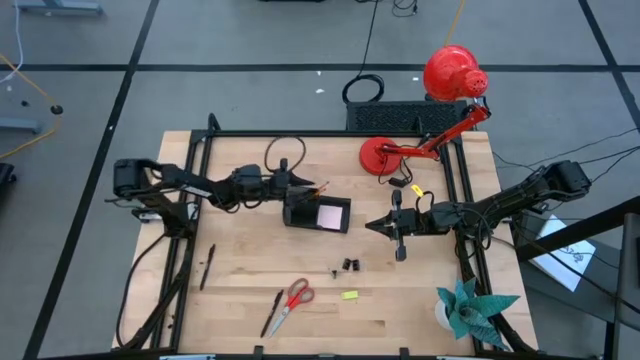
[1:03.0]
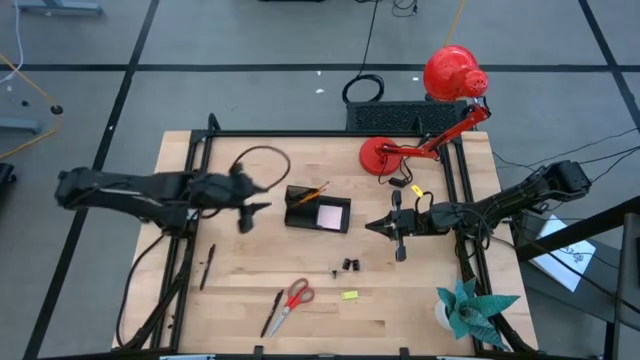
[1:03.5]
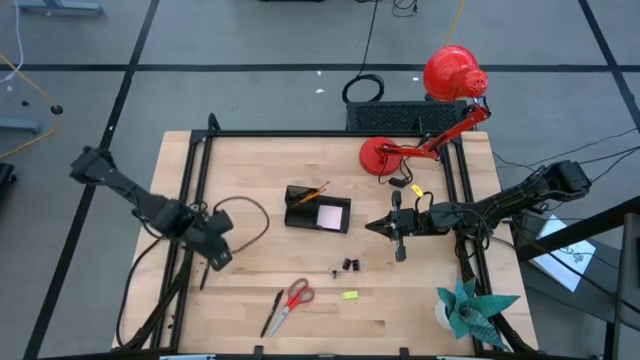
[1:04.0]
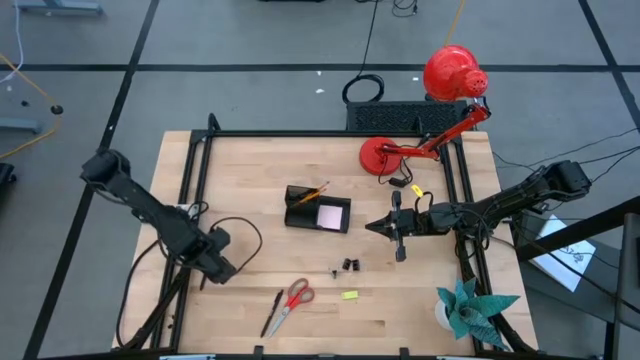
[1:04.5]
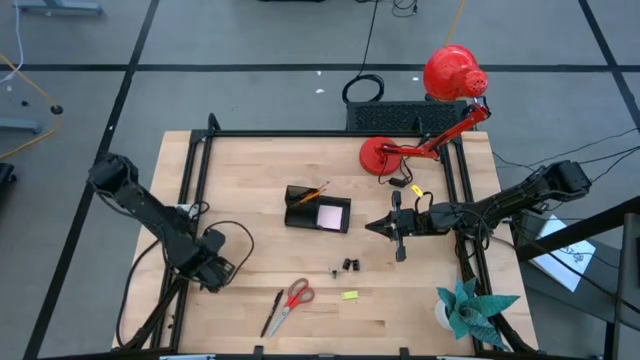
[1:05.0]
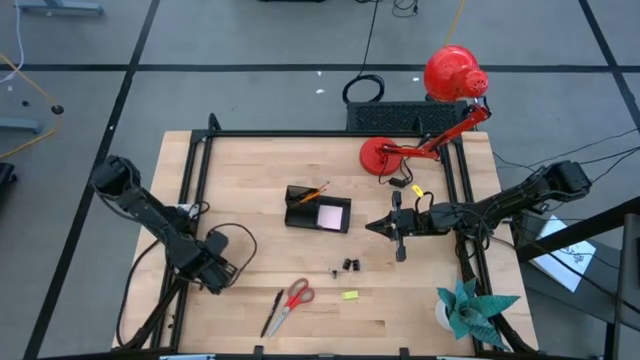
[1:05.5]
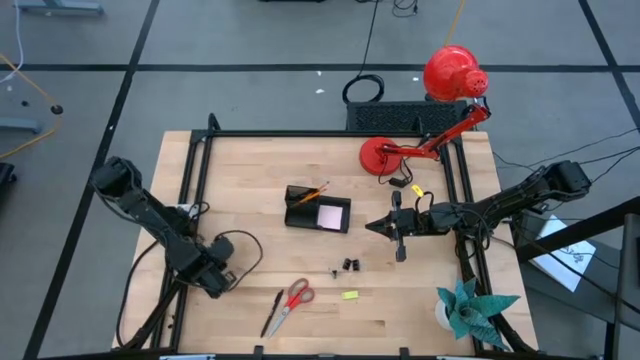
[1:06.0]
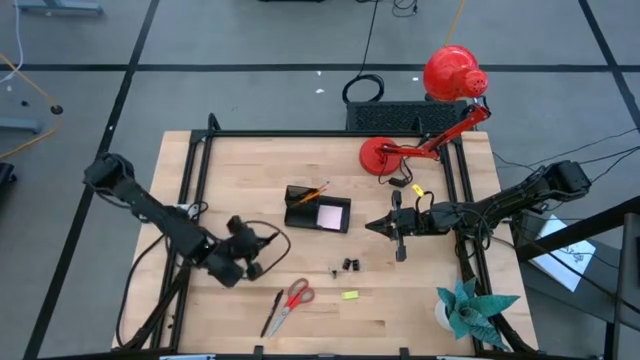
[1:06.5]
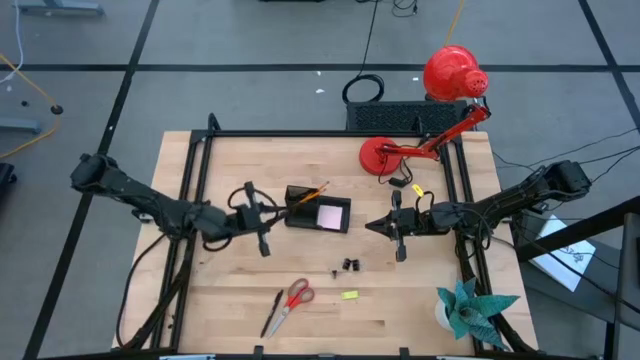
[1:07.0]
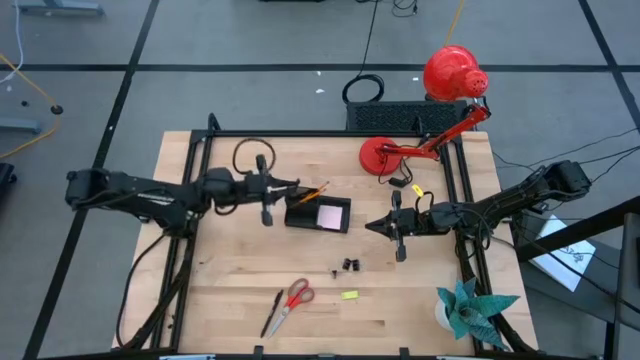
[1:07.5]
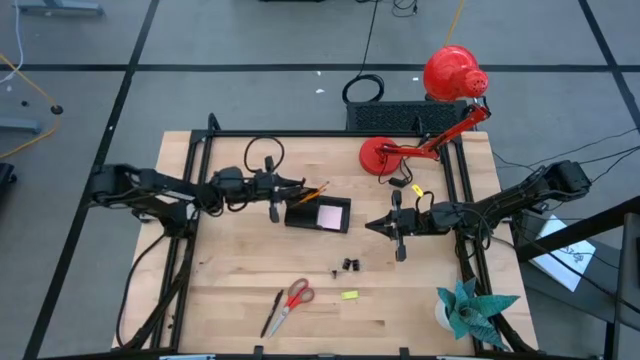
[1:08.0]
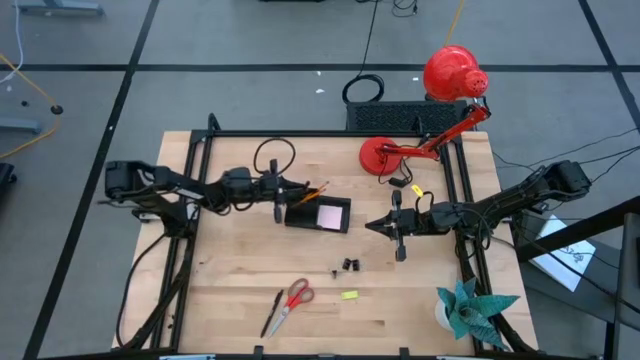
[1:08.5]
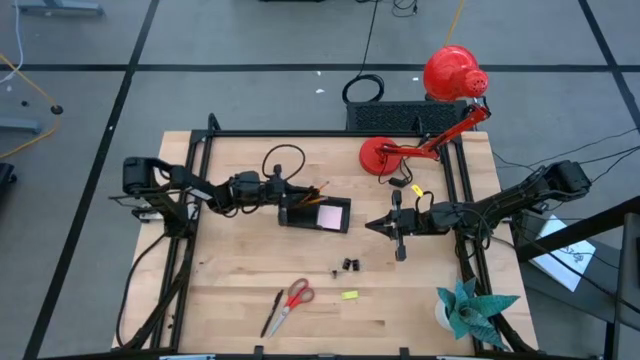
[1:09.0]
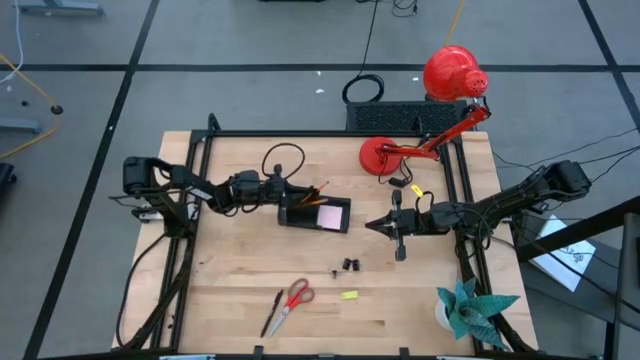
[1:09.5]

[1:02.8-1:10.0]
Task: Pick and place office supplies into organizer
Put the black pen into the black desk organizer

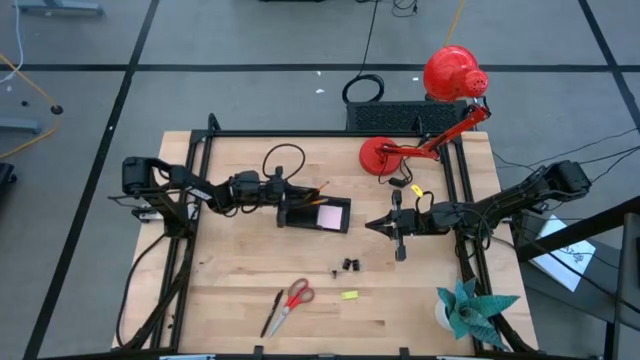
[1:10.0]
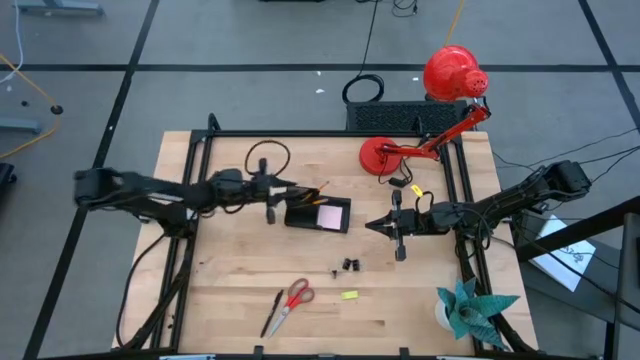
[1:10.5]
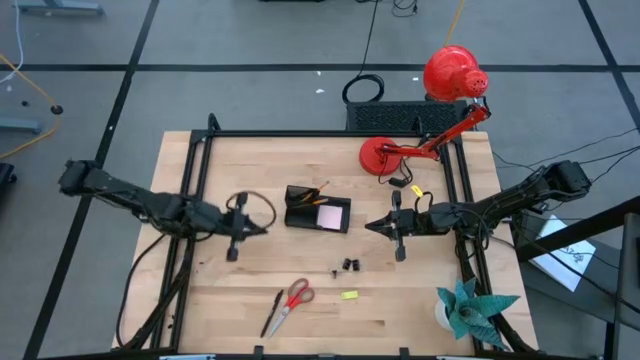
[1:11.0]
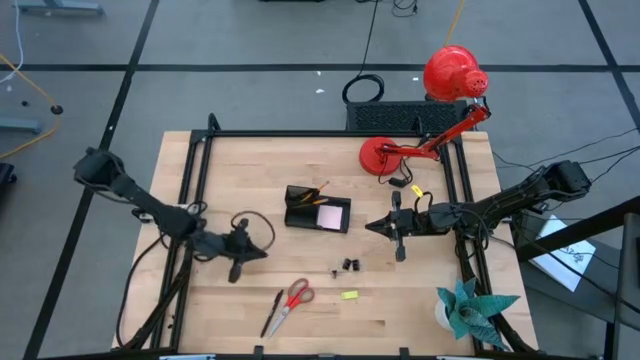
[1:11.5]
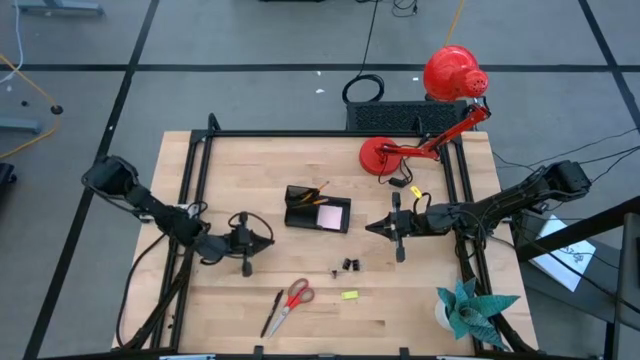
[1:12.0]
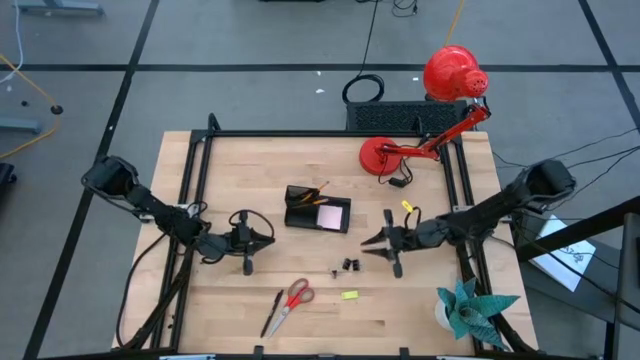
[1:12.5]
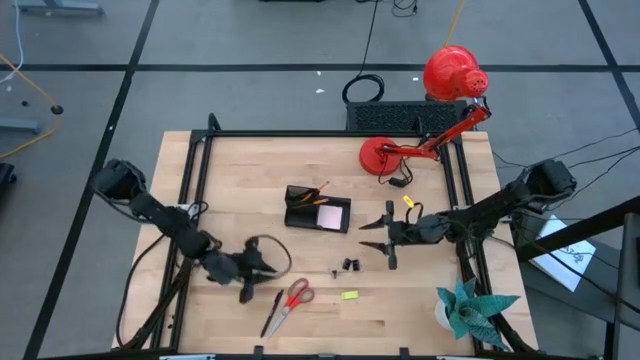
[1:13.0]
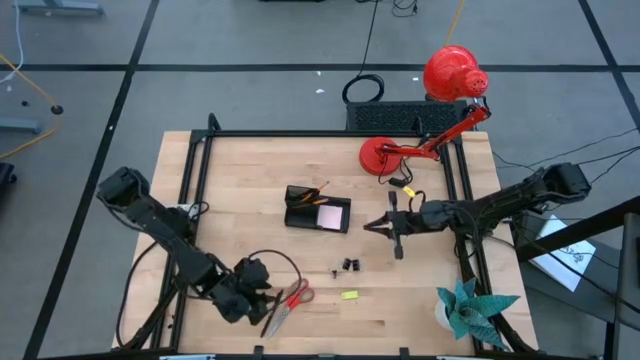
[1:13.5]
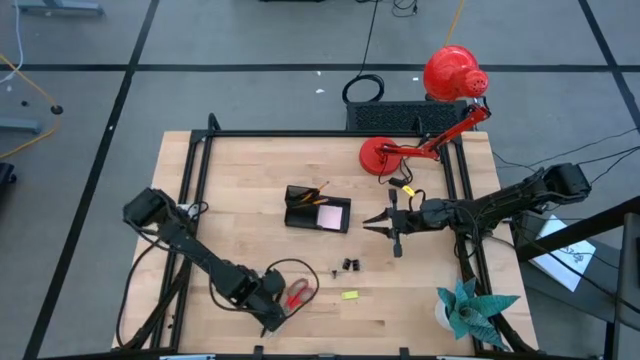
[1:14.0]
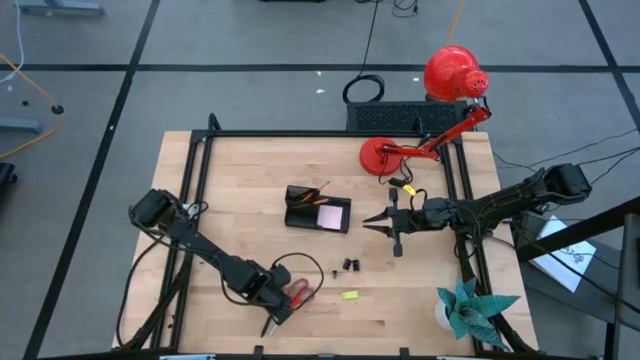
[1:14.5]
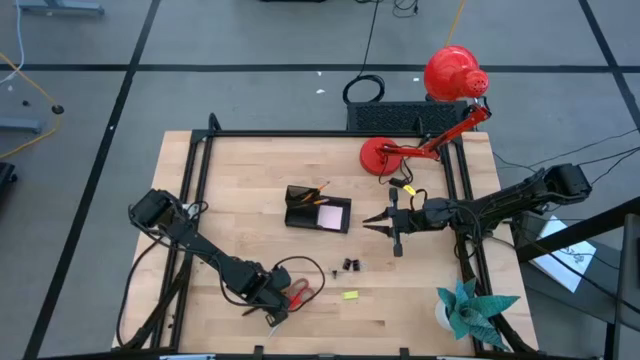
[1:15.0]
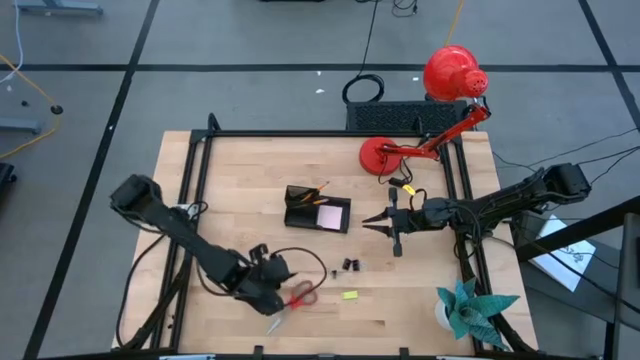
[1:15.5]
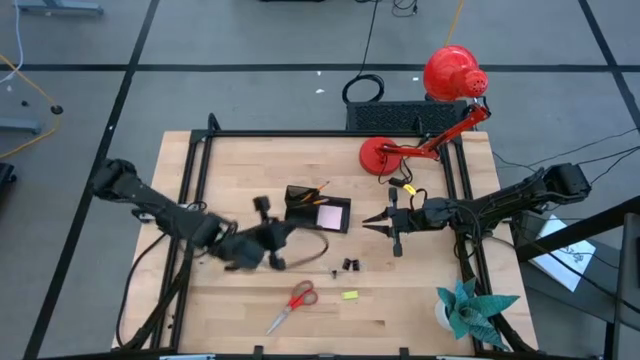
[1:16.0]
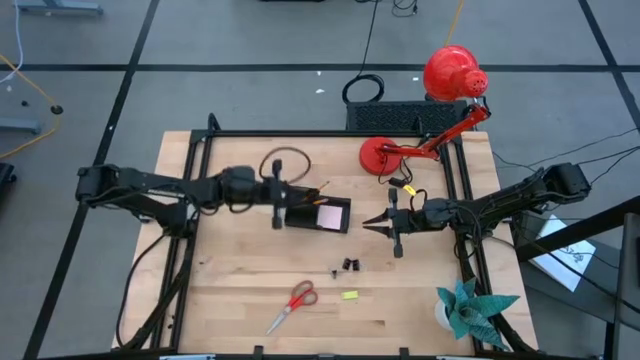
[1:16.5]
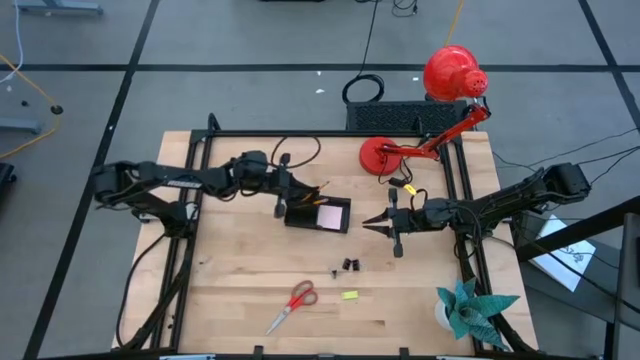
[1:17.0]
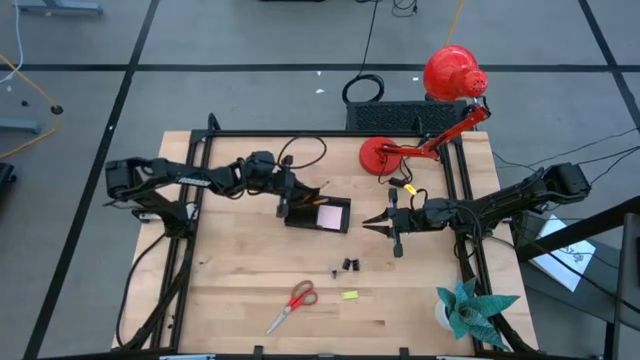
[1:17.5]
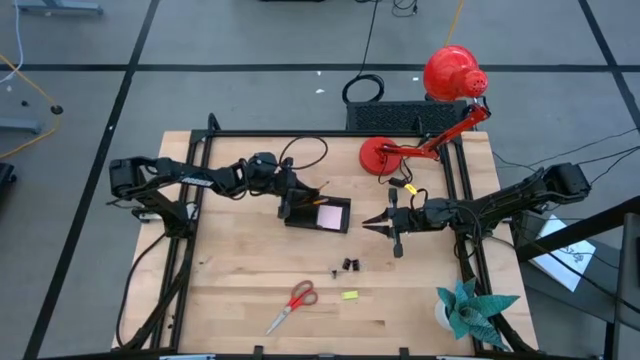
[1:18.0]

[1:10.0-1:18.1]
Put the black pen into the black desk organizer

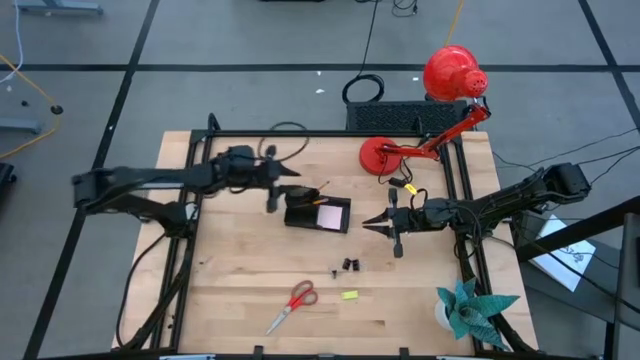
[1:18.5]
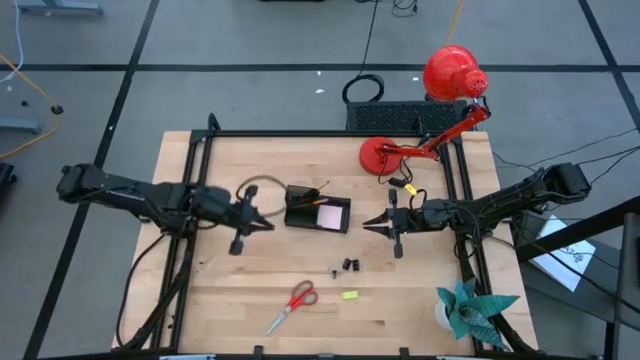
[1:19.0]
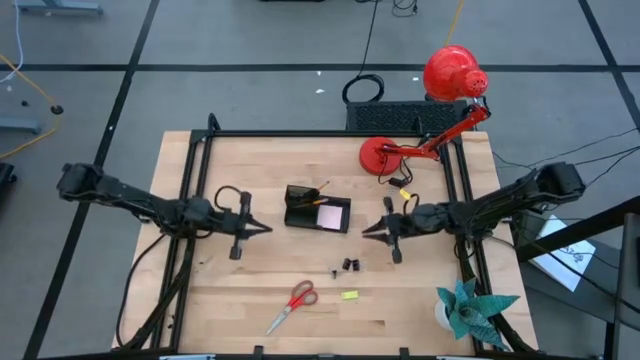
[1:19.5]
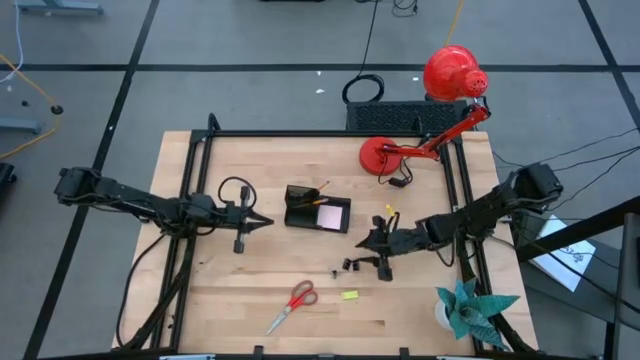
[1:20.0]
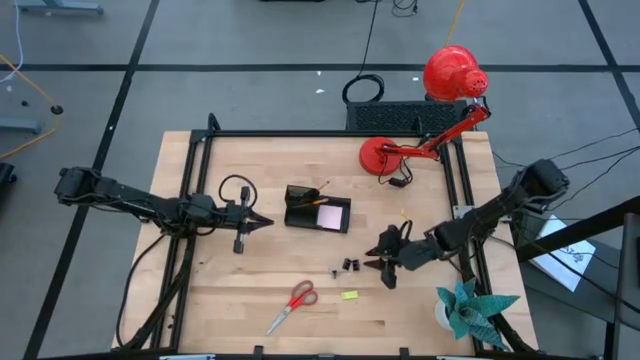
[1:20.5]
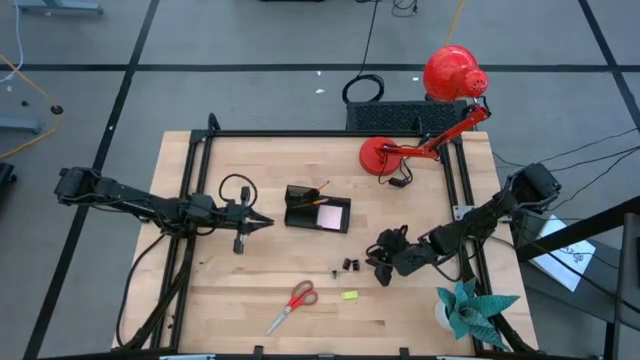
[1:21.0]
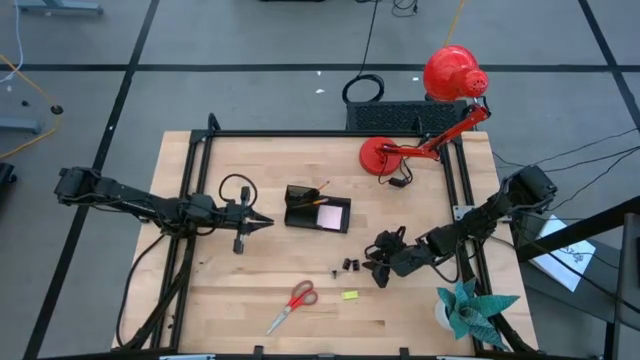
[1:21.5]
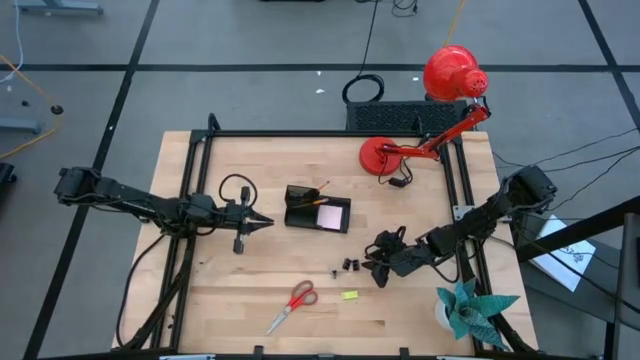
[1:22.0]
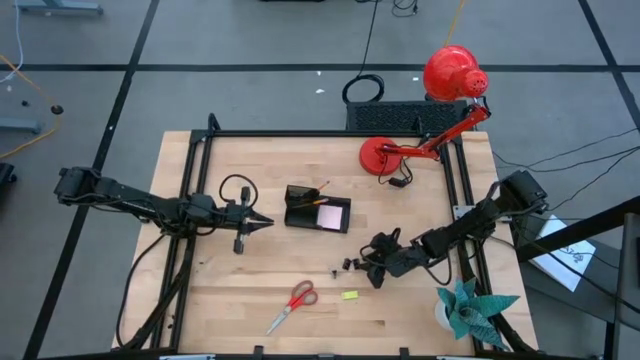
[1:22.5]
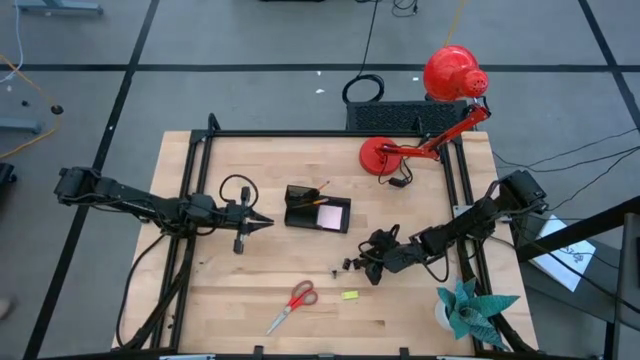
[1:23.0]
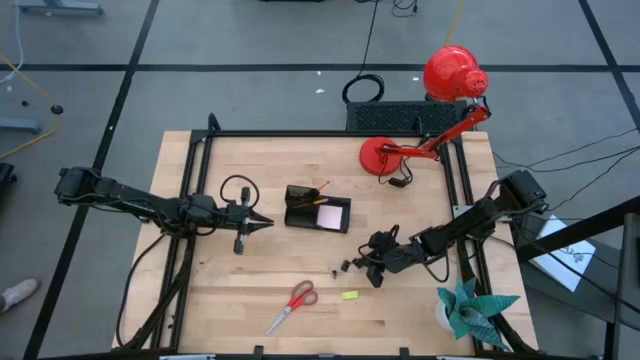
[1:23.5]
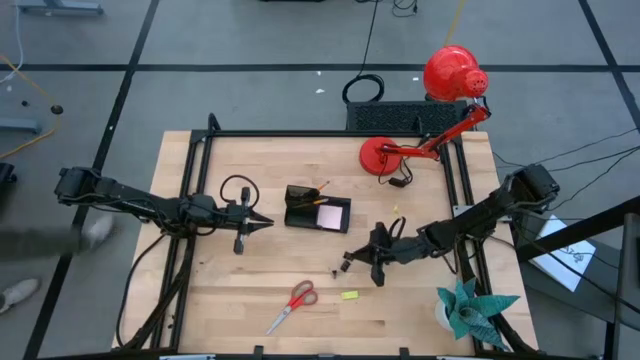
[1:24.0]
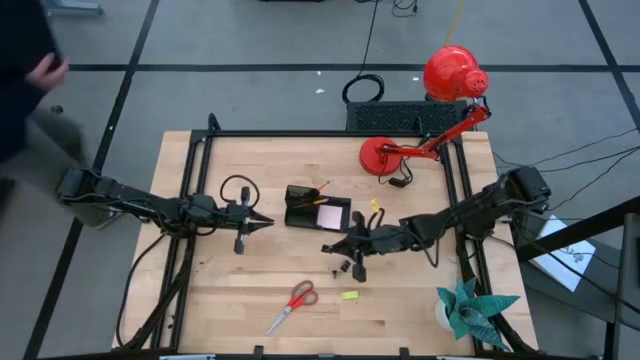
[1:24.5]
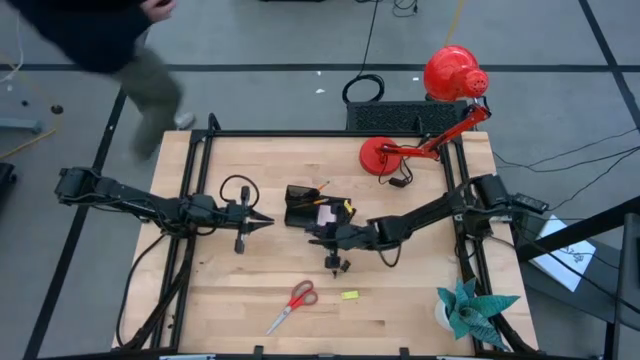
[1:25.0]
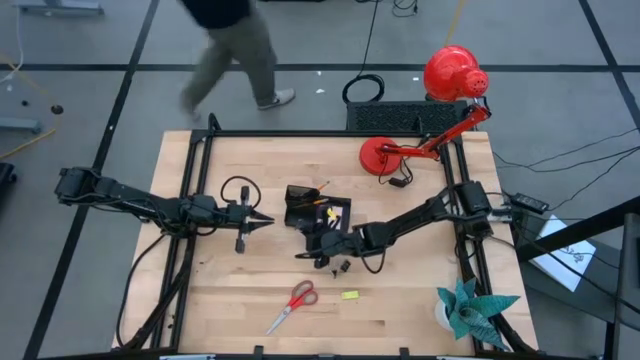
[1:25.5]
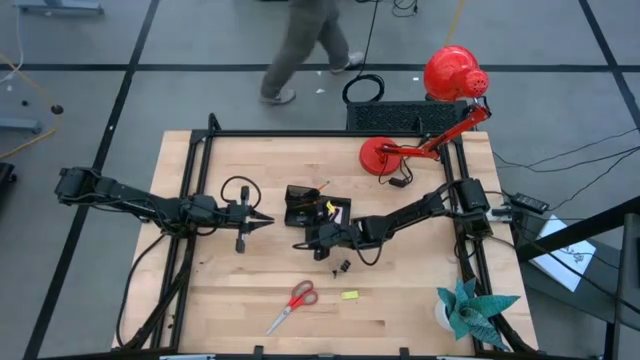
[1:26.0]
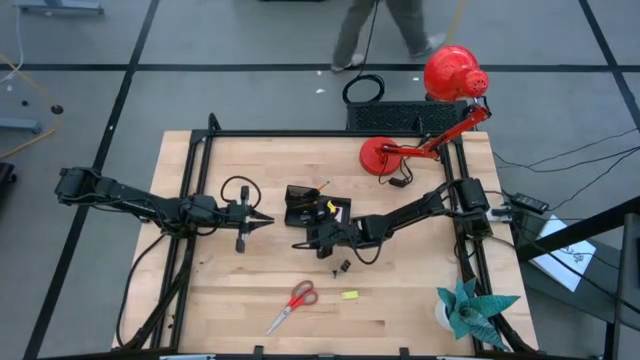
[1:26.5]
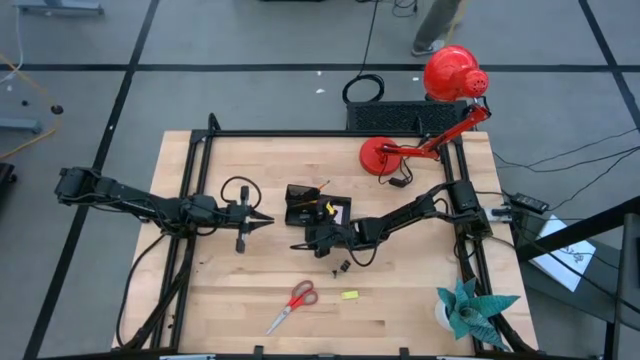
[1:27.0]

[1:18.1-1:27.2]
Put the black binder clip into the black desk organizer
